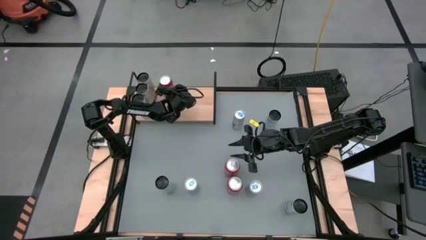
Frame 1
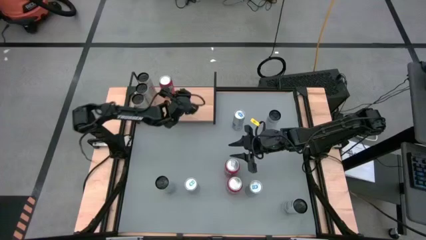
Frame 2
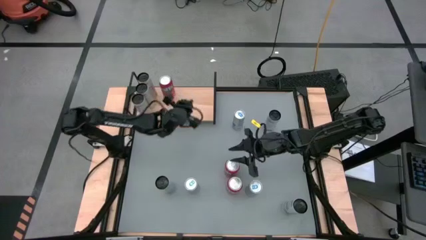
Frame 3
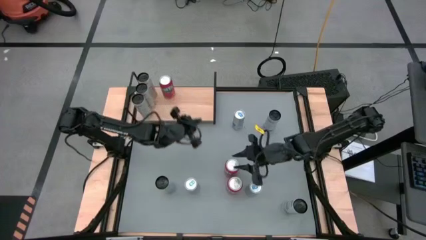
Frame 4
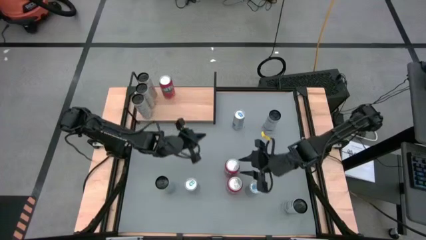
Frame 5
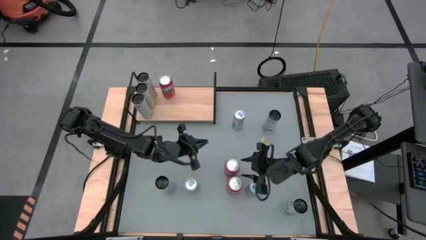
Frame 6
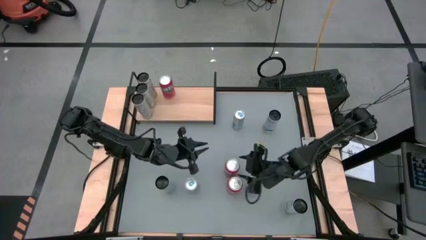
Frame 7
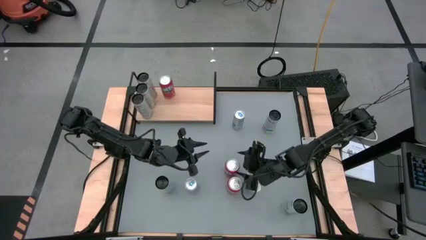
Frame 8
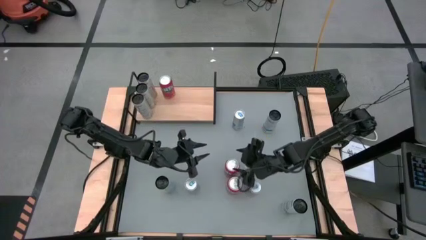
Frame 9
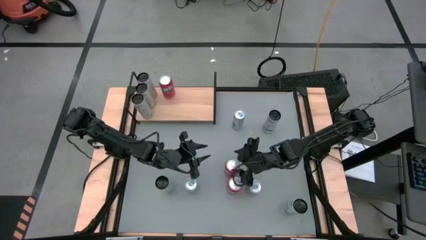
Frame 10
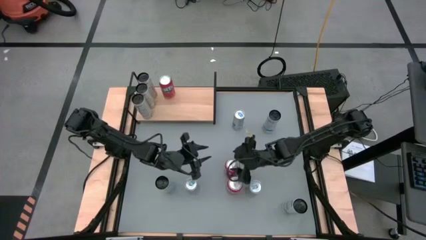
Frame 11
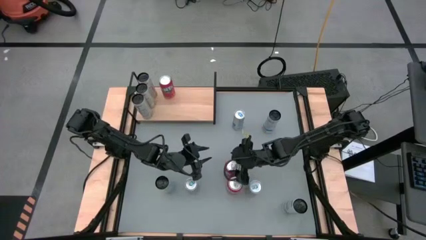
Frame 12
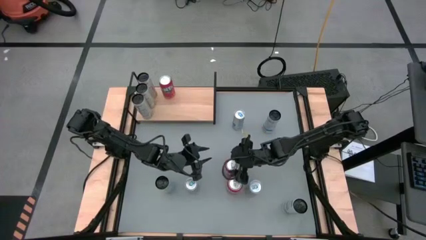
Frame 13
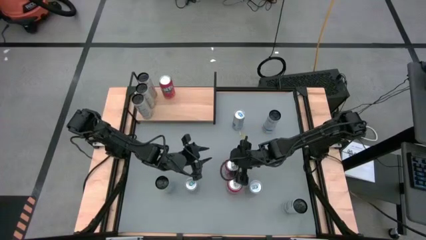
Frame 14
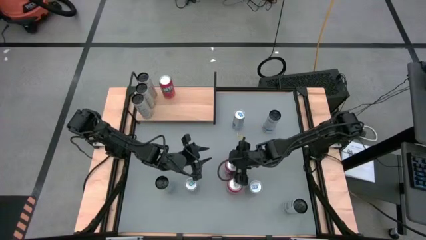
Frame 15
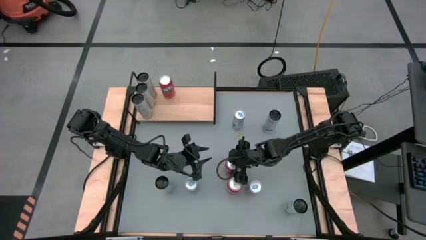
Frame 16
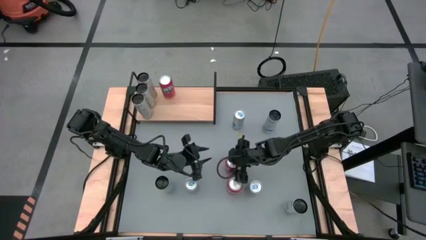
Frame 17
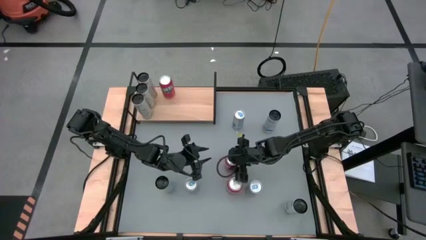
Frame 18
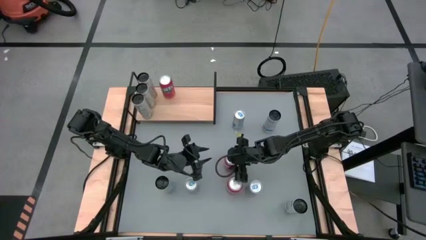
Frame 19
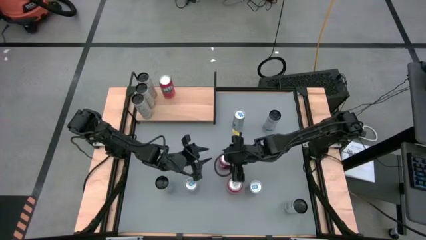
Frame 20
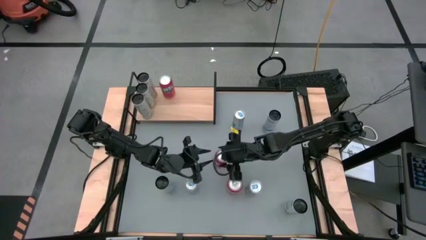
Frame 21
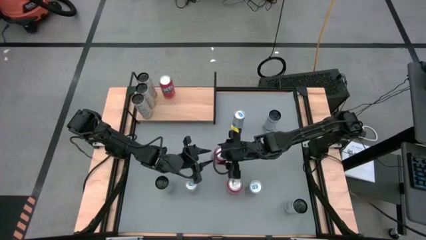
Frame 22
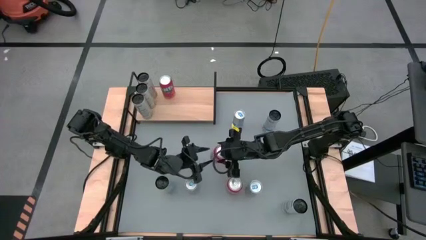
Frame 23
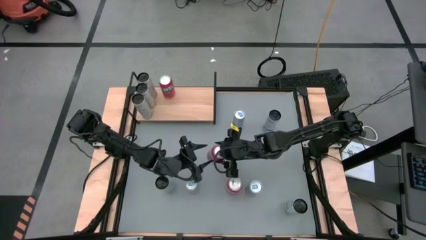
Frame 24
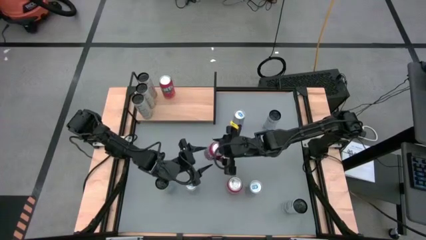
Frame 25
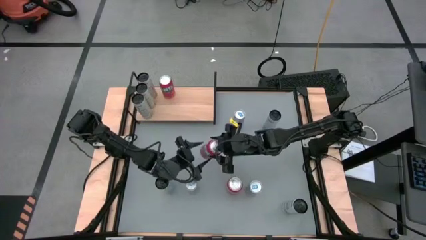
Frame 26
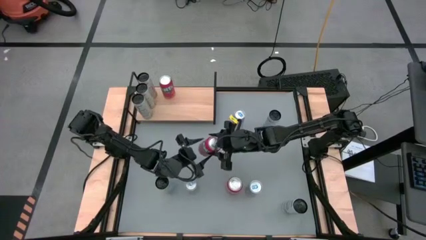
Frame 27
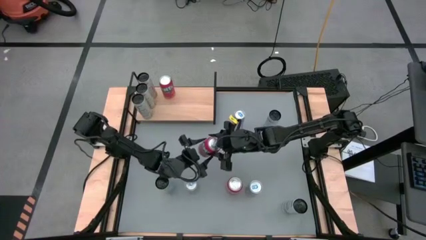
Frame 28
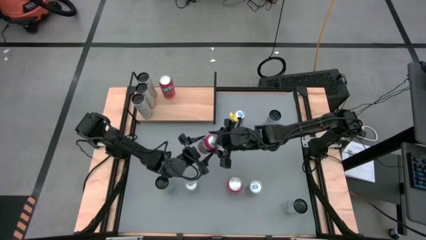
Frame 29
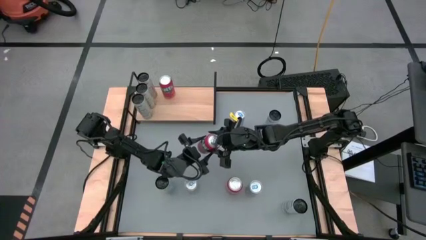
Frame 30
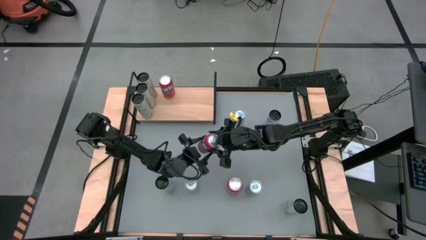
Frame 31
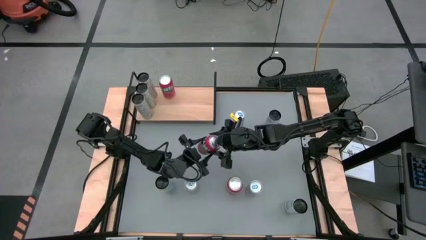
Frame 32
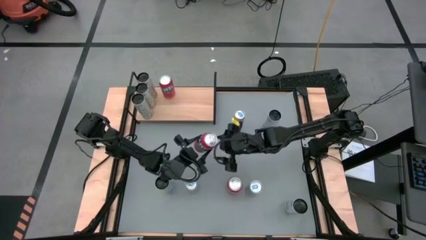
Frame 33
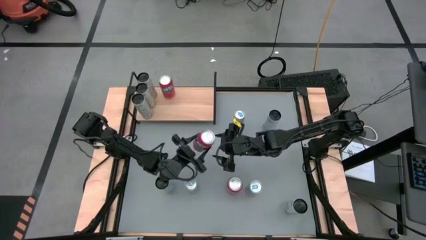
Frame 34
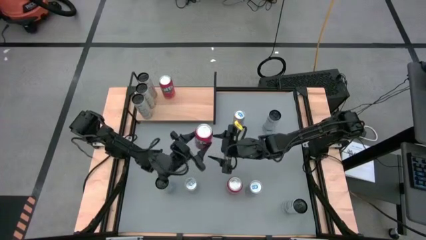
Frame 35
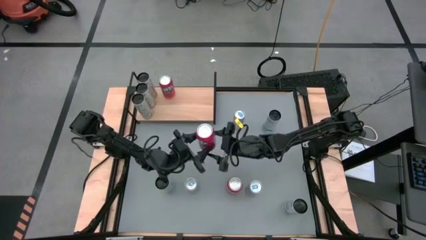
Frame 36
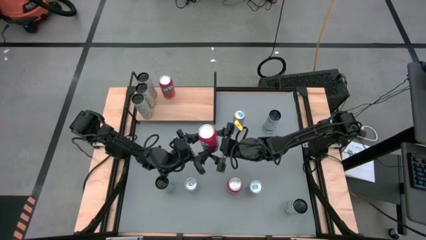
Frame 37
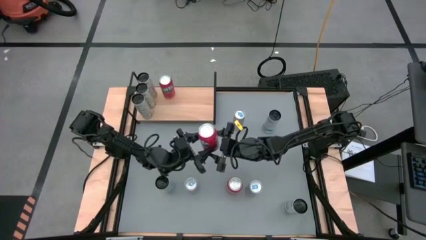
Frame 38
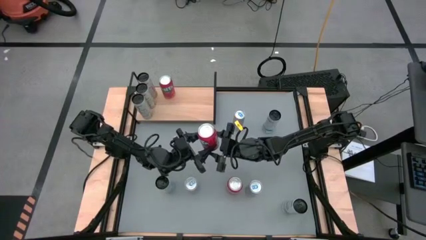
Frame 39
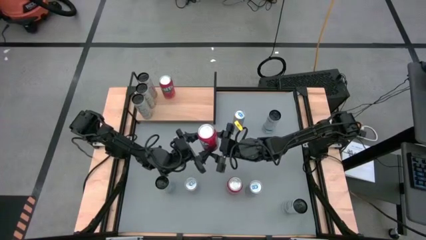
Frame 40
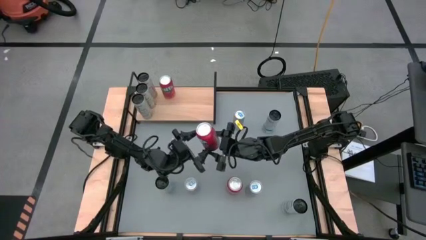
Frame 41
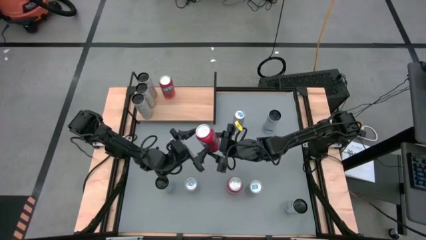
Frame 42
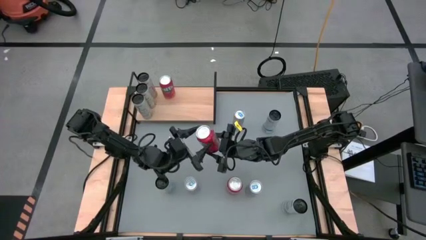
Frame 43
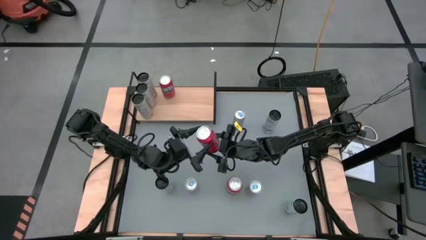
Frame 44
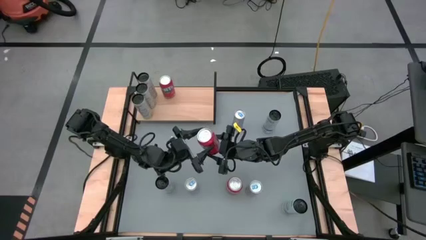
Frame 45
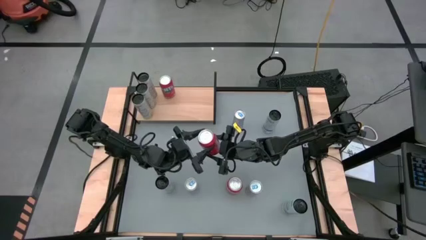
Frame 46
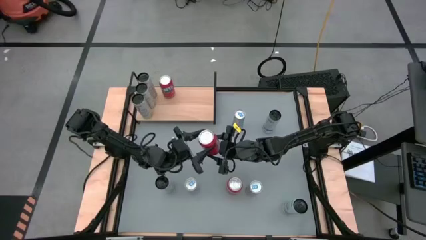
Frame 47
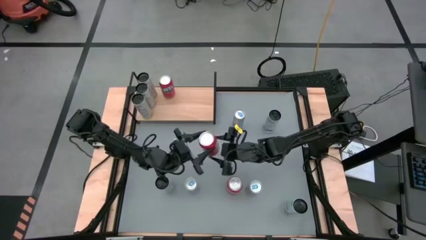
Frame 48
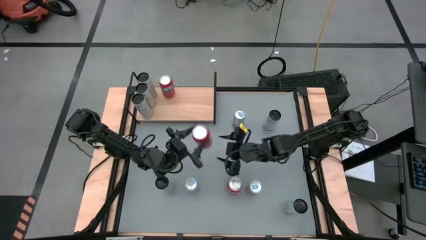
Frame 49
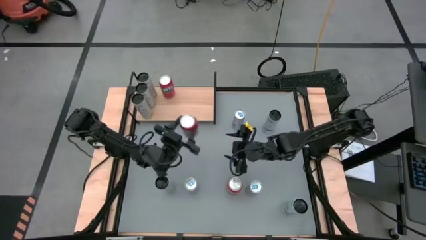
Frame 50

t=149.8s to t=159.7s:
Task: Place canned beverage on shelf
Put the top red soda can on the shelf aligned with the other red soda can

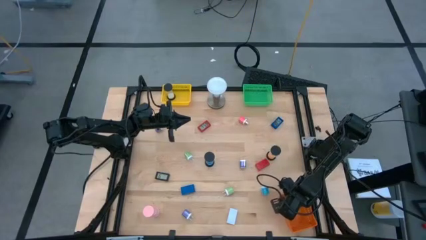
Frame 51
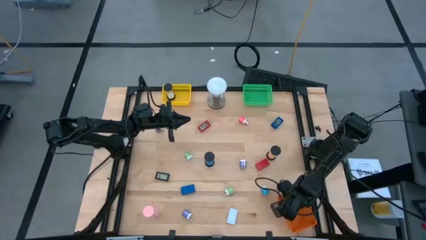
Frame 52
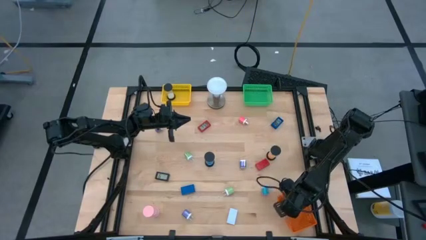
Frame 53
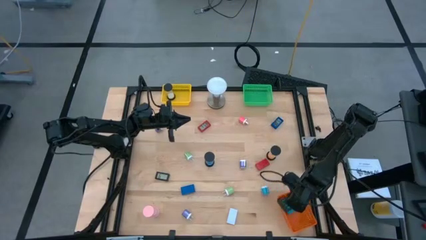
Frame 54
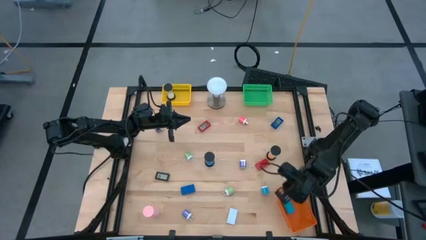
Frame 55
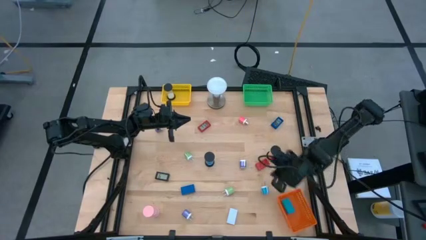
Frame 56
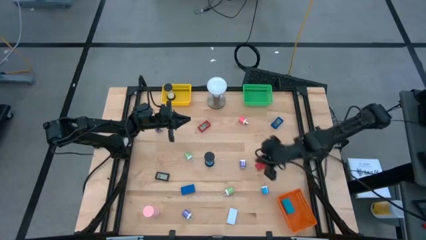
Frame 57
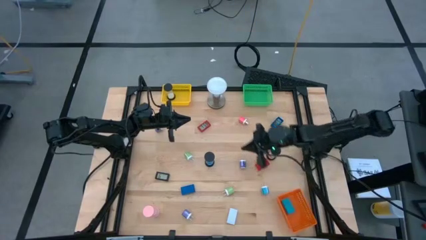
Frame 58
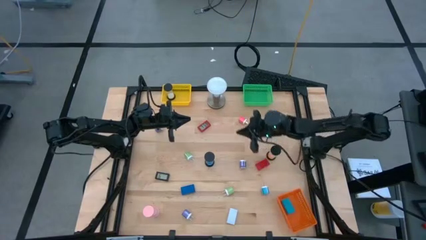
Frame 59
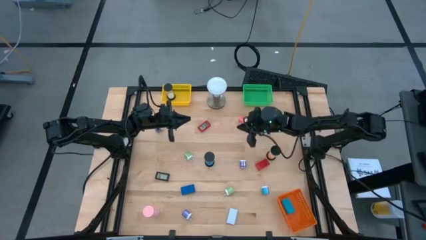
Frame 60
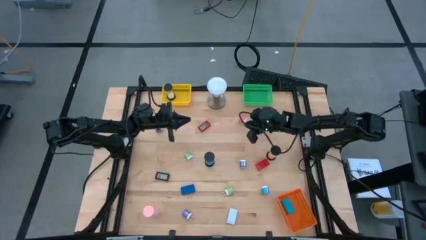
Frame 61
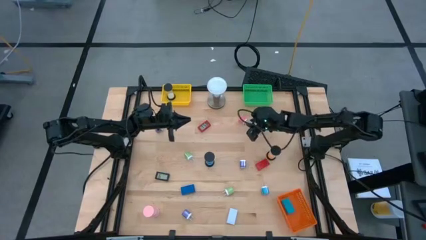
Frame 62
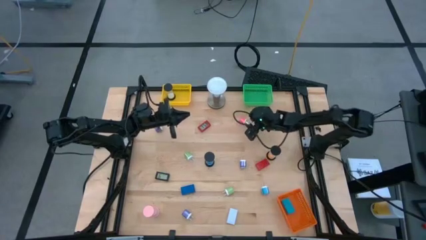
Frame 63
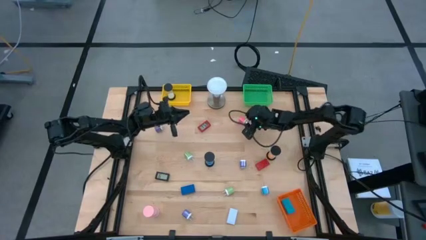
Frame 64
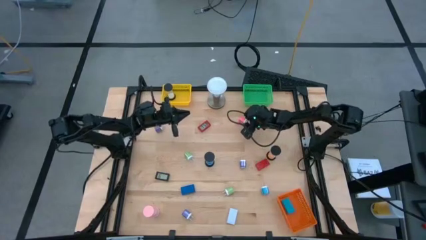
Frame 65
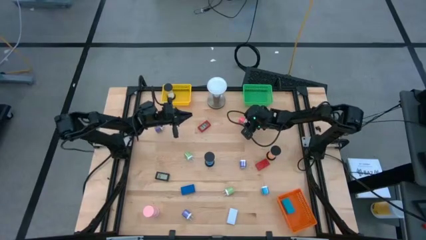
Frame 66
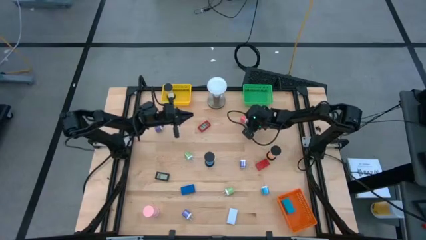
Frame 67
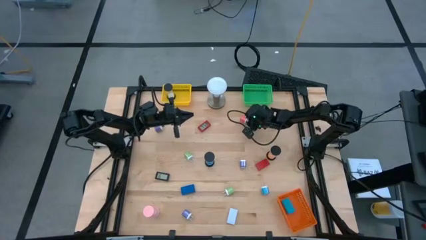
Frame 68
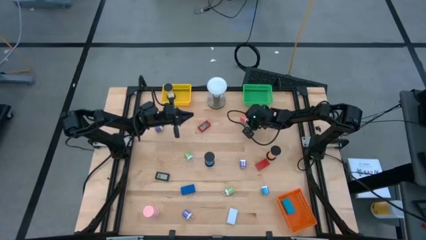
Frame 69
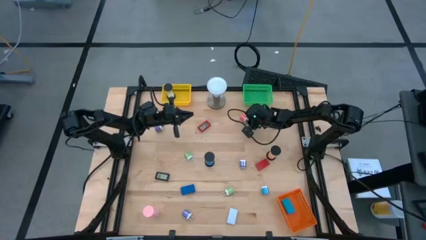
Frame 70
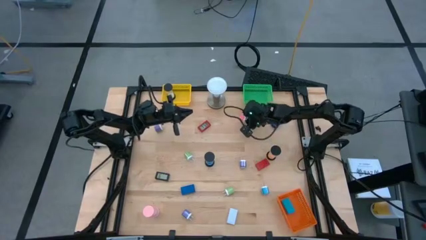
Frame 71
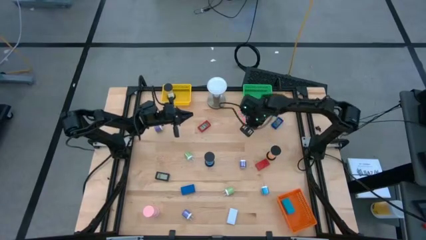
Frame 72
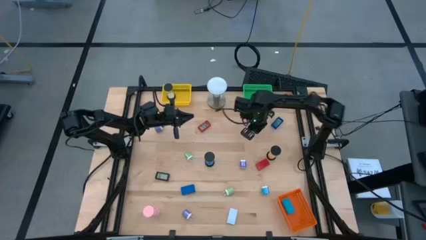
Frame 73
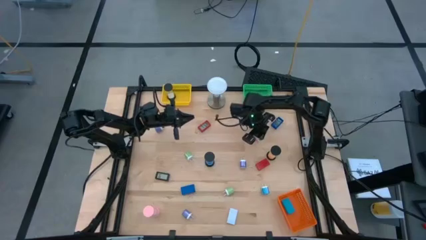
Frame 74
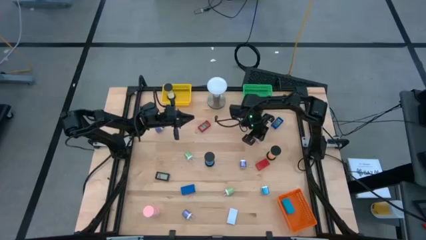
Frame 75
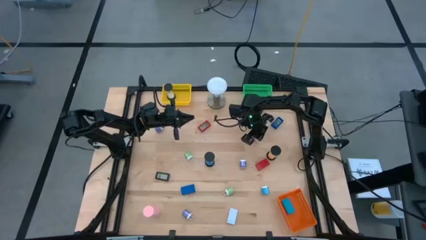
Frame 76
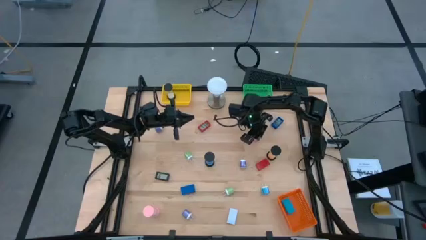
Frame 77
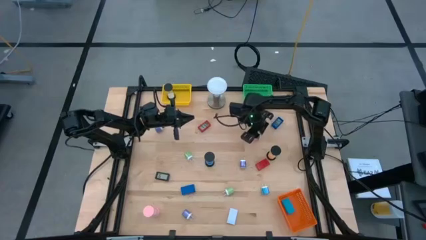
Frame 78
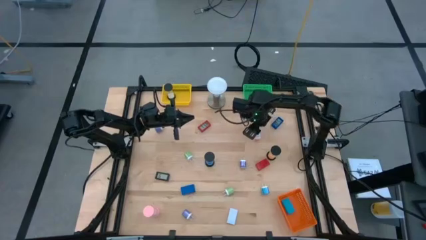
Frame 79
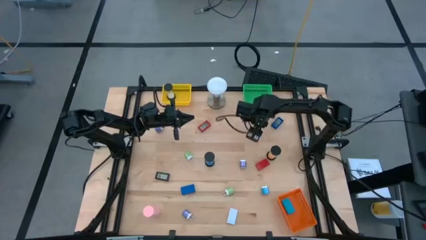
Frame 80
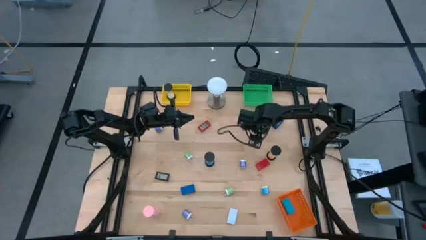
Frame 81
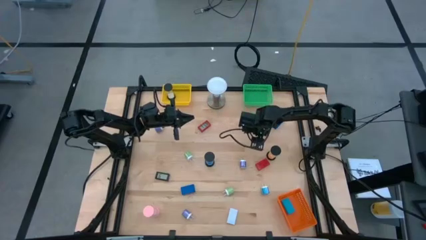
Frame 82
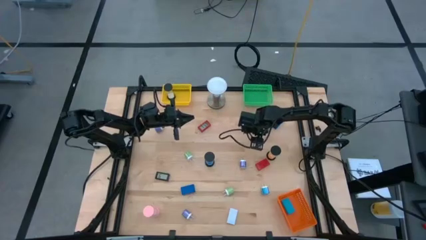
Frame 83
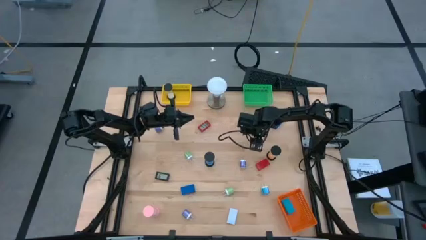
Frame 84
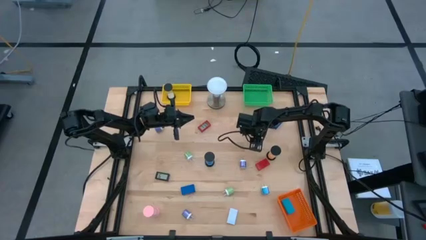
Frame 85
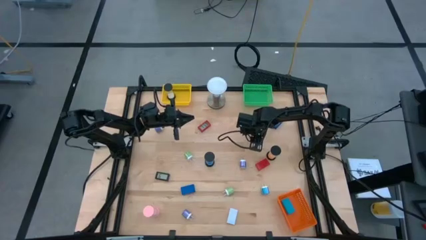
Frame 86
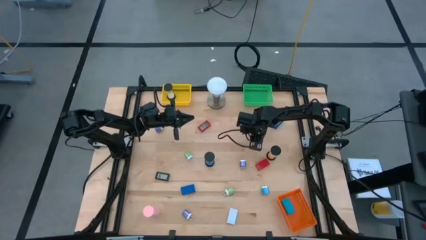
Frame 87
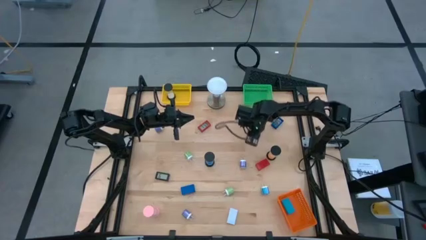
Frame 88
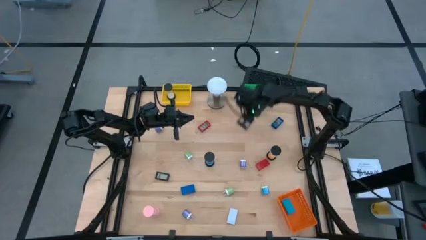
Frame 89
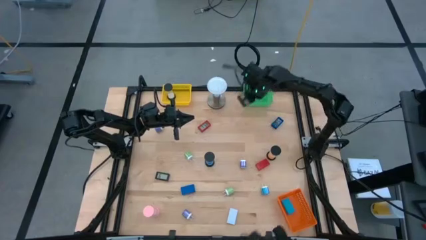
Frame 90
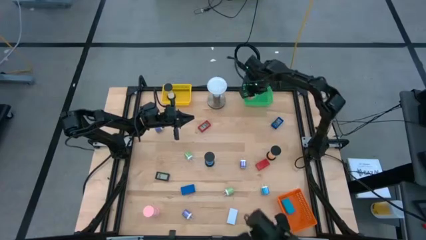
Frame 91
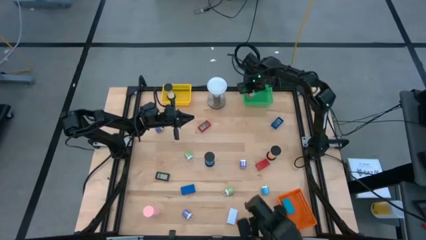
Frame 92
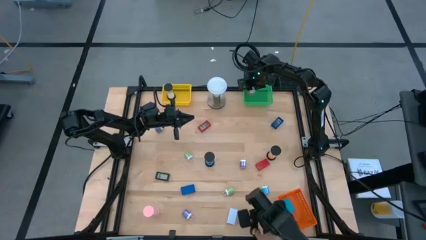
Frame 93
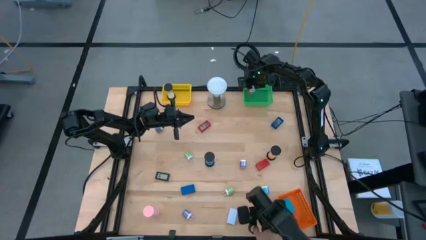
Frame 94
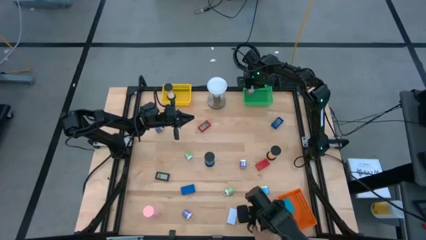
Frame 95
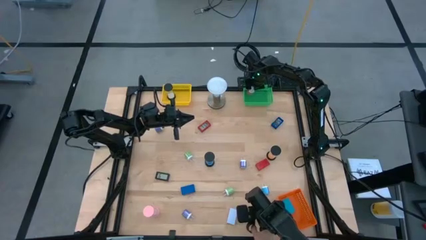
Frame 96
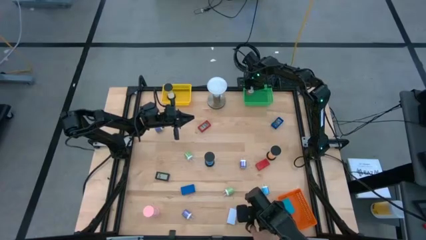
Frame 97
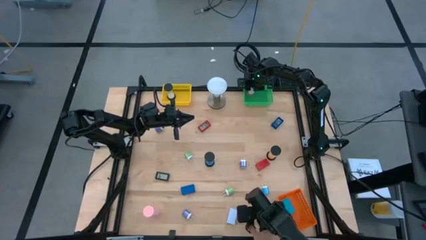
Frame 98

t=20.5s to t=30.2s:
Task: Pick & Place Office items
Put the pink charger adapter into the green bin
